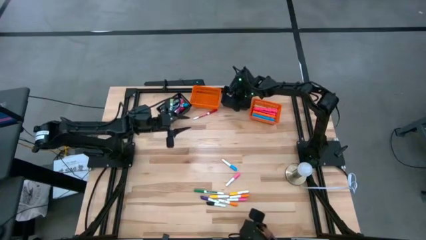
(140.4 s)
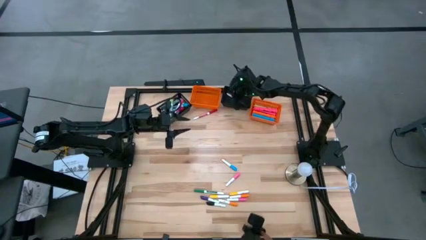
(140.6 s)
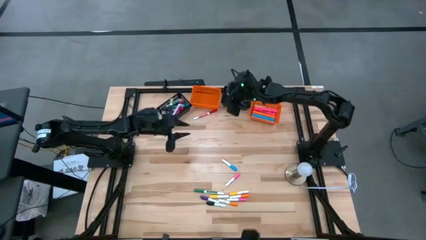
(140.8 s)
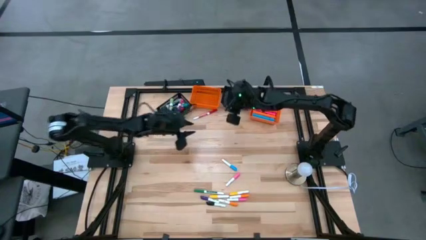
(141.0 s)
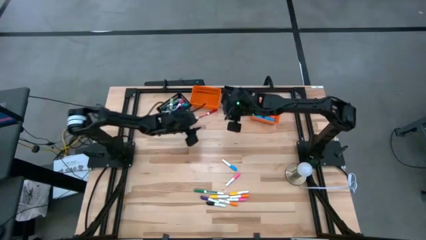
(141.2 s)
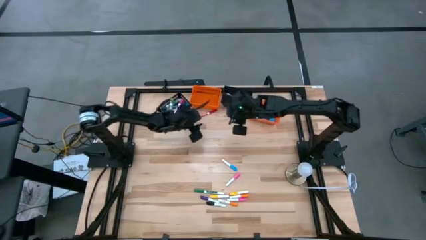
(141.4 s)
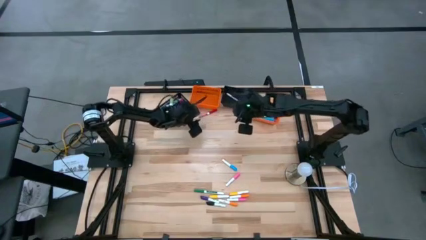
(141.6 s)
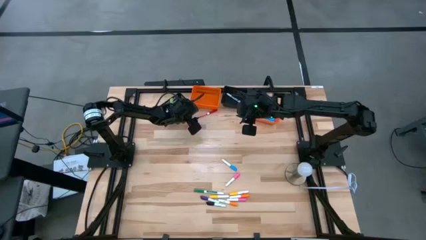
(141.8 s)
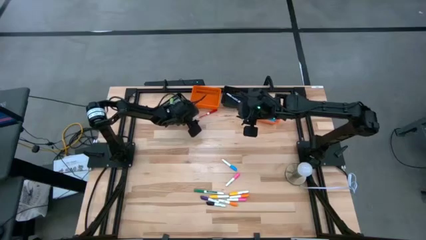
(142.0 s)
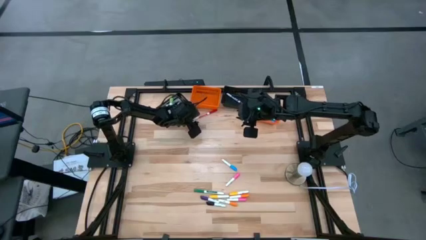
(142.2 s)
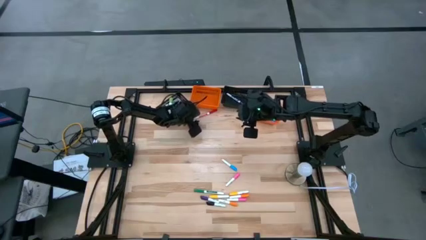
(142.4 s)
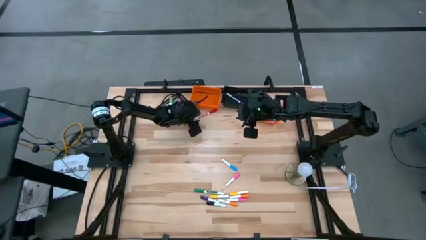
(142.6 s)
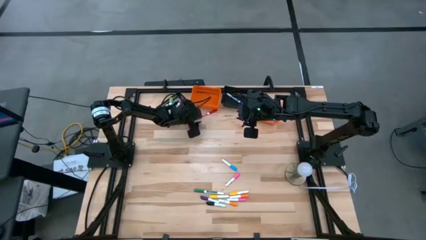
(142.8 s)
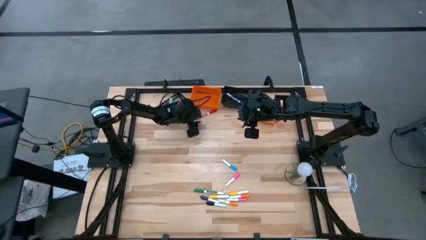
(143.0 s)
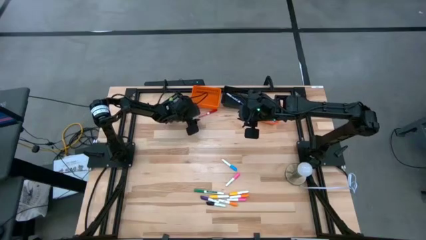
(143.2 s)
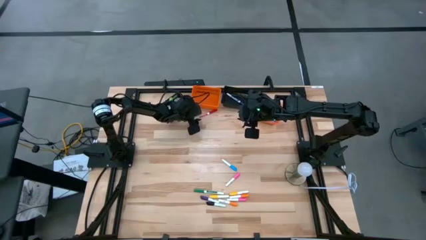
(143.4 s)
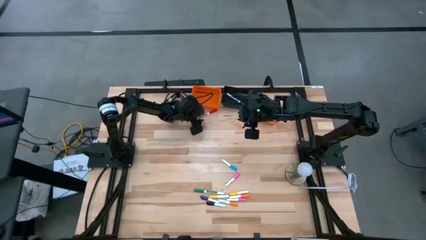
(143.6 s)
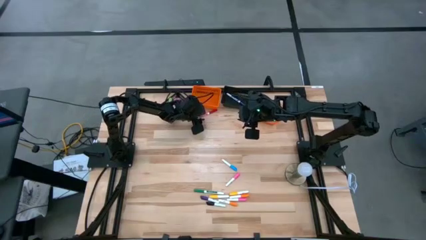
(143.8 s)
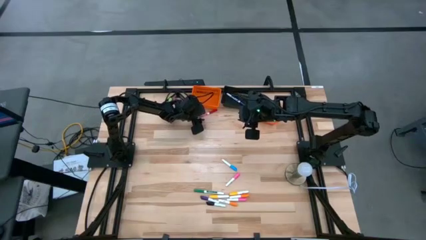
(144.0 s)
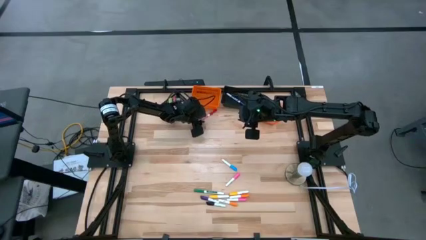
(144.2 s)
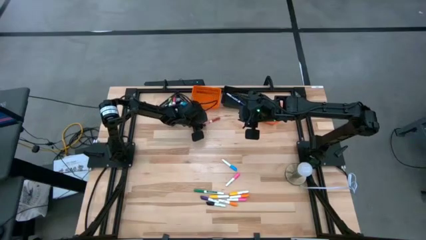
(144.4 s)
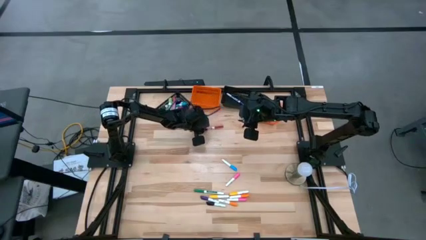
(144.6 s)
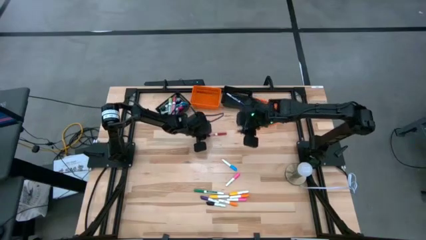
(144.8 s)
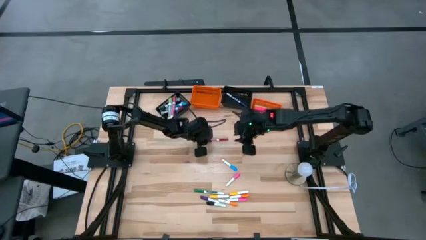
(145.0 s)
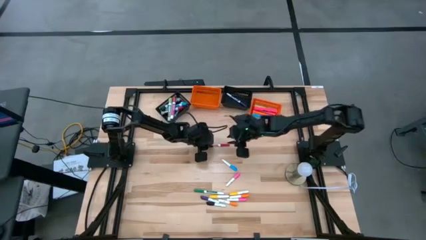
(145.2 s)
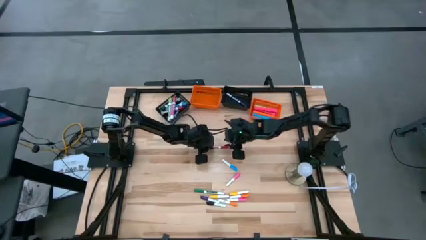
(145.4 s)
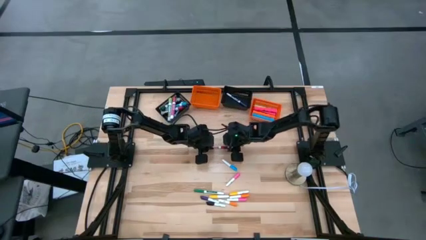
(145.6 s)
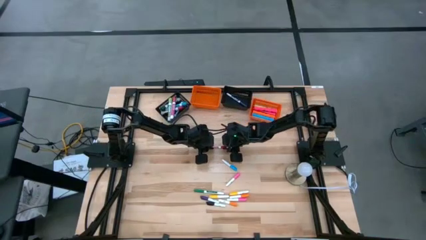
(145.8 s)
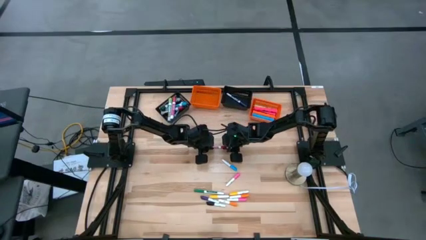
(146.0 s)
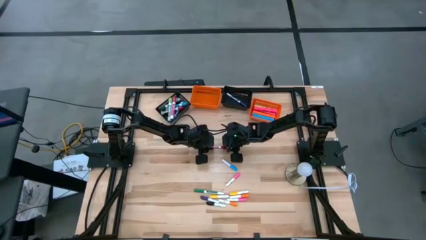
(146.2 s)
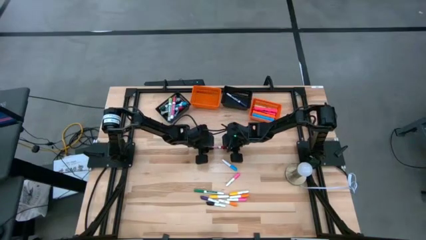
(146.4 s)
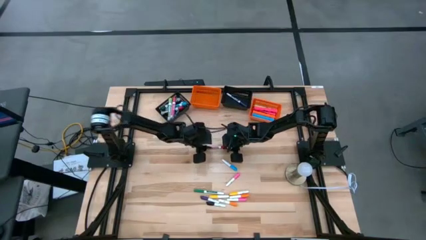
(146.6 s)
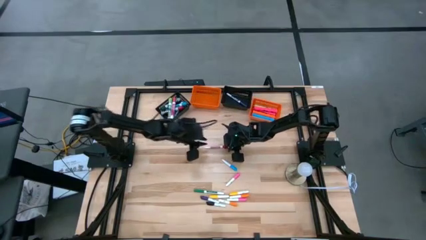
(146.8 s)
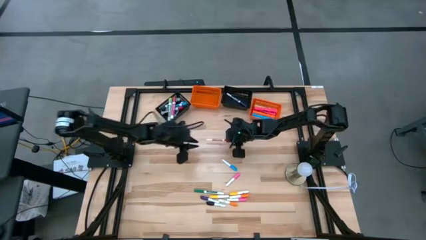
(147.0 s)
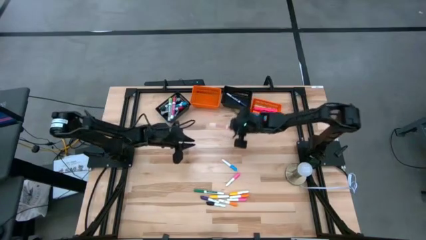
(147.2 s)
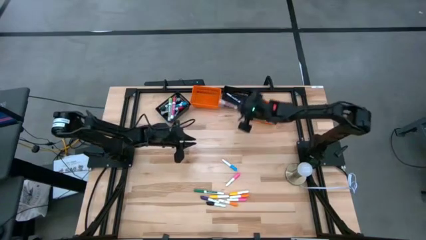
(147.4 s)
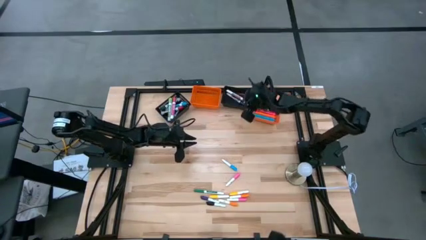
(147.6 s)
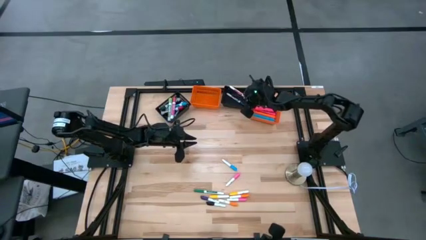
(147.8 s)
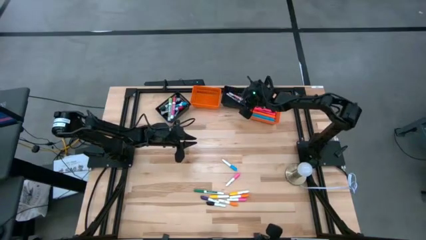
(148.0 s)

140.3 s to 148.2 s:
Task: Pick & Place Markers
Put the small red marker into the right black bin

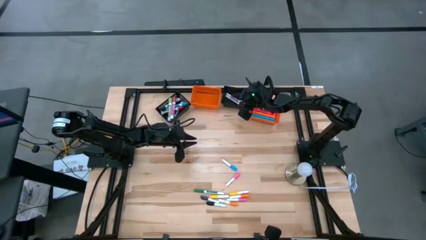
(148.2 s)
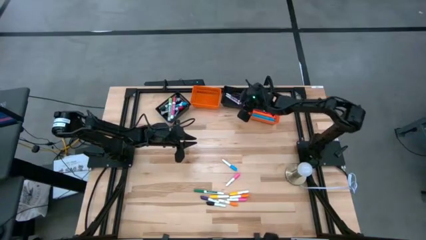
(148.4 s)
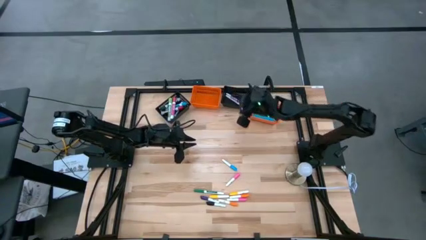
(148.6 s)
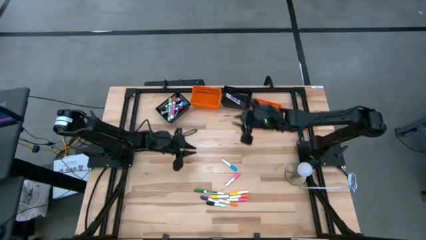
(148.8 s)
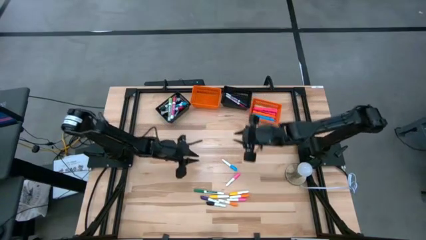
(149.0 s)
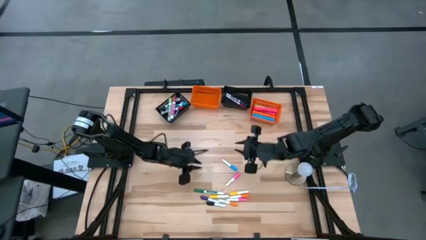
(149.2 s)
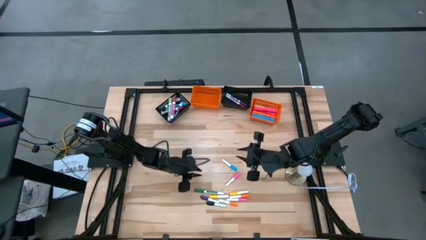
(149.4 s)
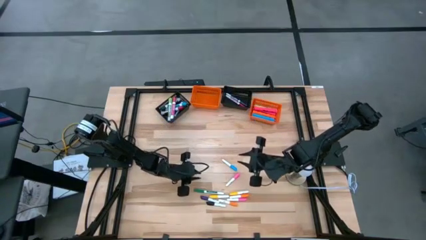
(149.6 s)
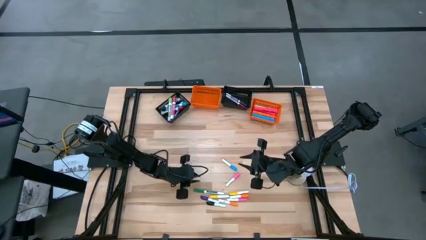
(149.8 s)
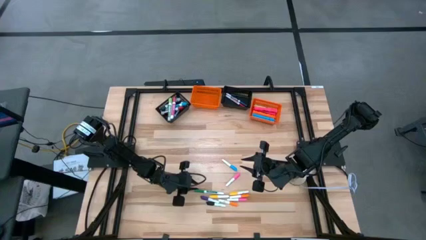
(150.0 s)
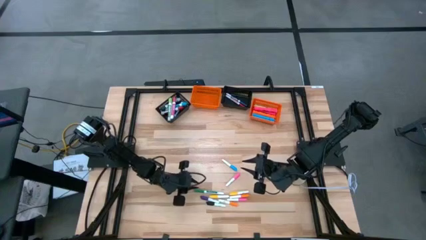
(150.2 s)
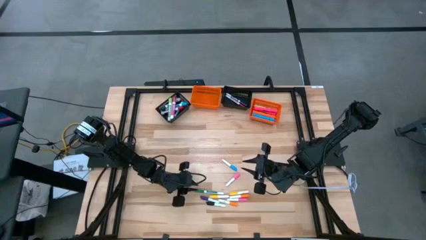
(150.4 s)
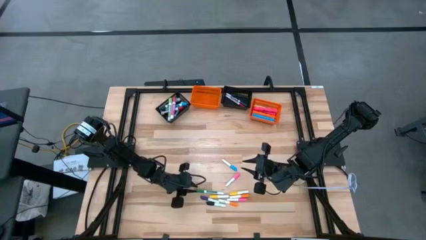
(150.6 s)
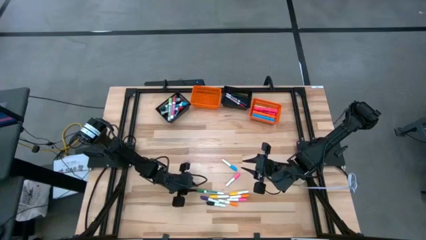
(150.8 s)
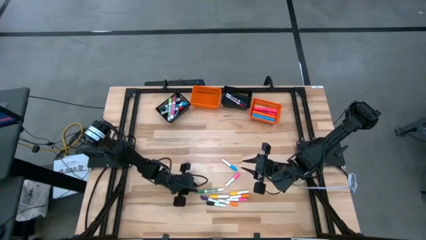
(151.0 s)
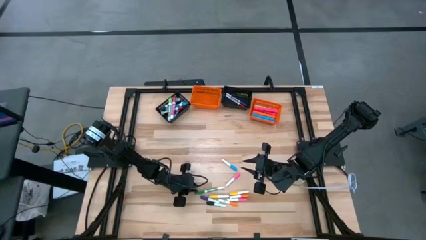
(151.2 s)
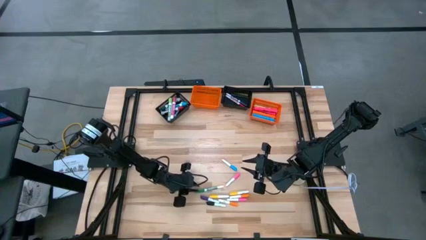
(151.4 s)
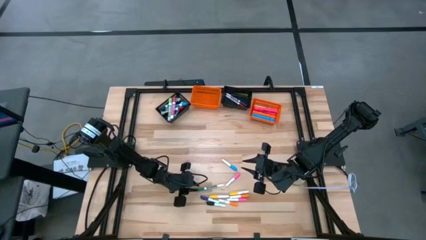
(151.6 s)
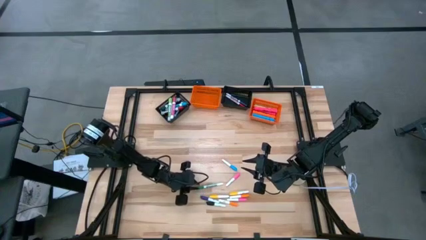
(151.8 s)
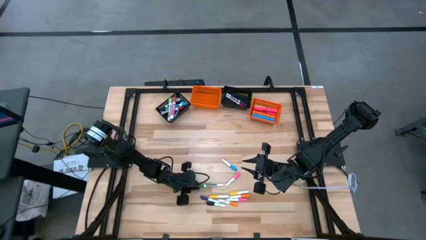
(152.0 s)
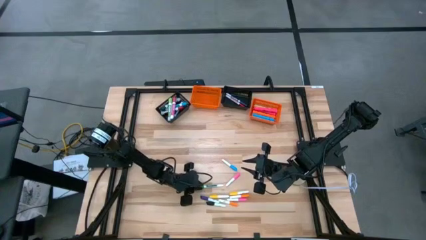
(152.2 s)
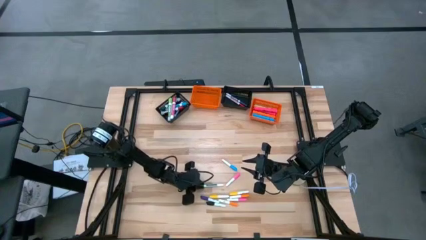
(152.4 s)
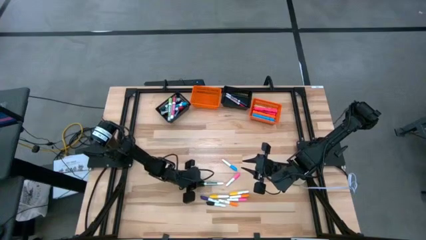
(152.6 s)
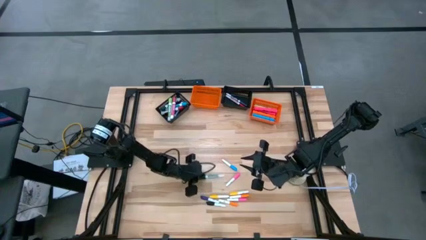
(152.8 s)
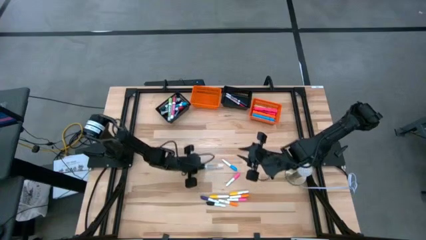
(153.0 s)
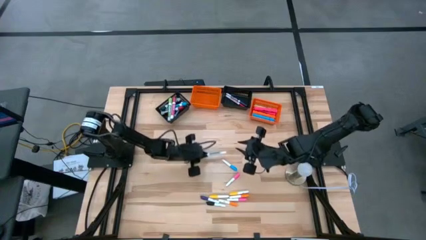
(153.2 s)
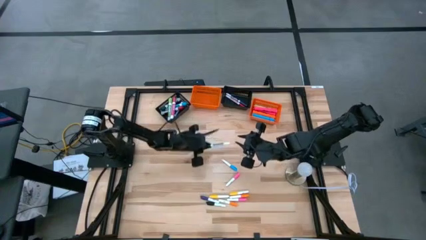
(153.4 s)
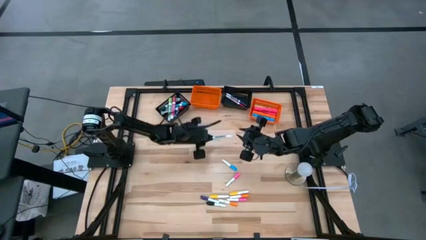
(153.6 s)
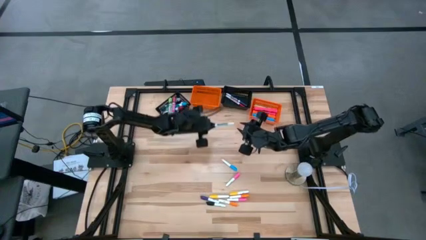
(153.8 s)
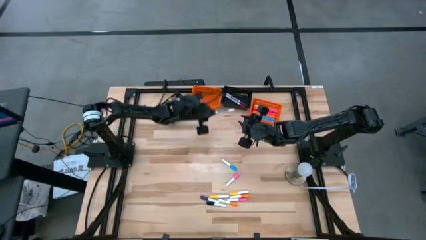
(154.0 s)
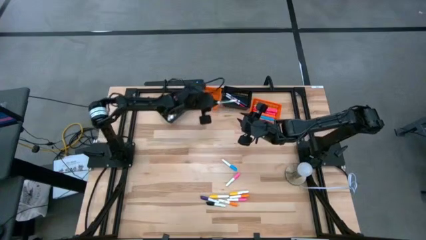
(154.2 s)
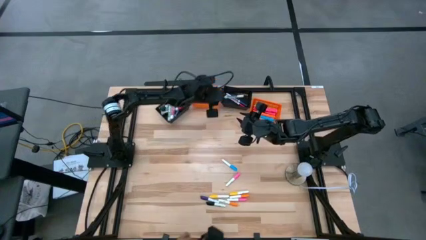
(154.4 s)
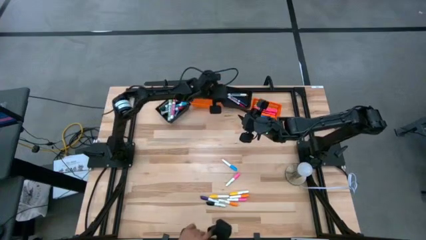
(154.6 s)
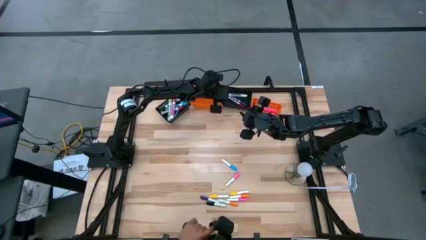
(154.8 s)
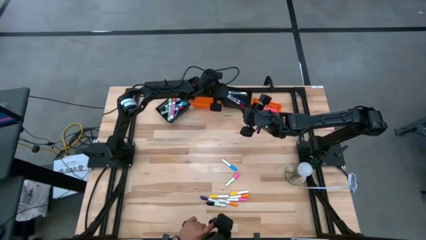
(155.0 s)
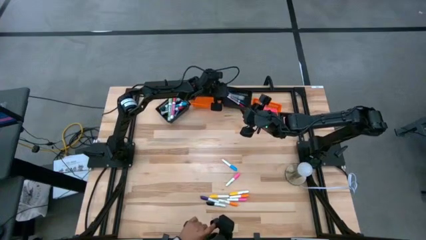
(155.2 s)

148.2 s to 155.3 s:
Put the small green marker into the right black bin
